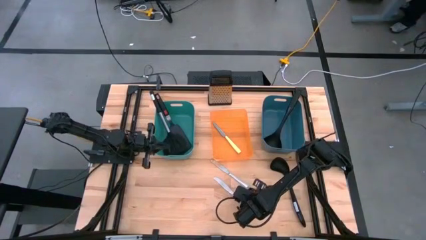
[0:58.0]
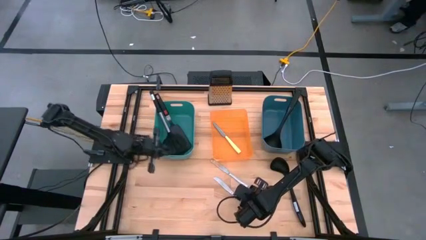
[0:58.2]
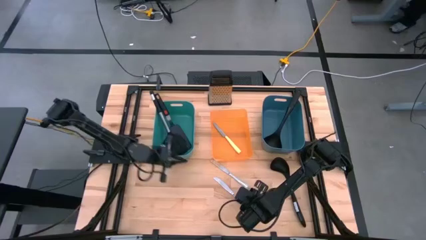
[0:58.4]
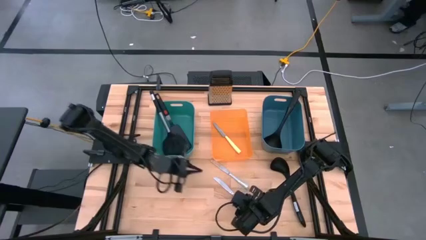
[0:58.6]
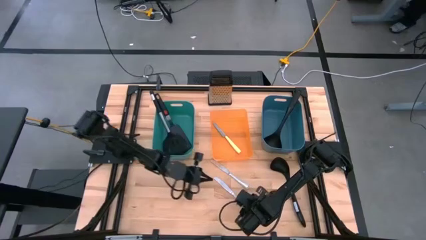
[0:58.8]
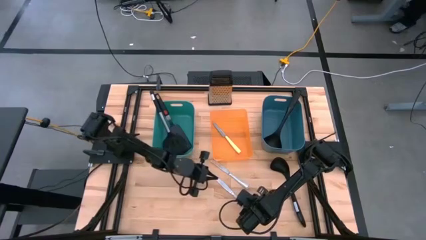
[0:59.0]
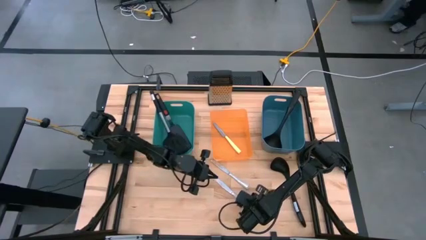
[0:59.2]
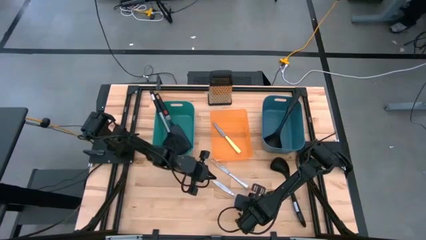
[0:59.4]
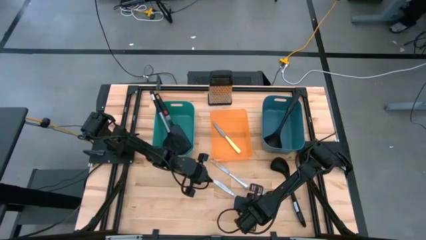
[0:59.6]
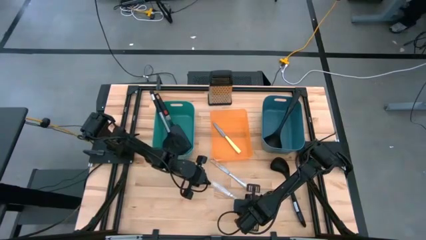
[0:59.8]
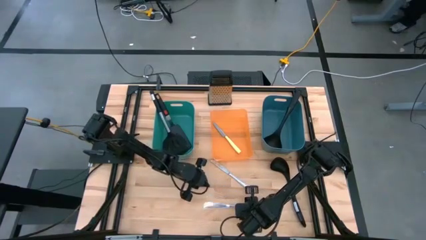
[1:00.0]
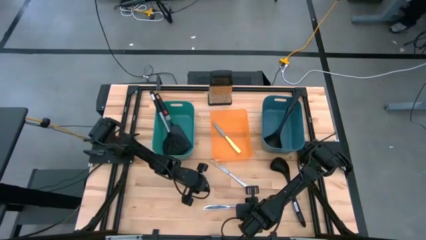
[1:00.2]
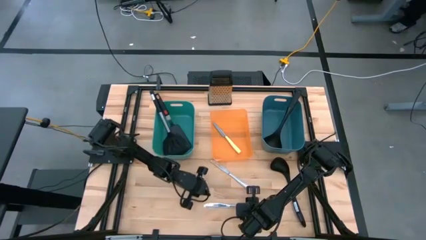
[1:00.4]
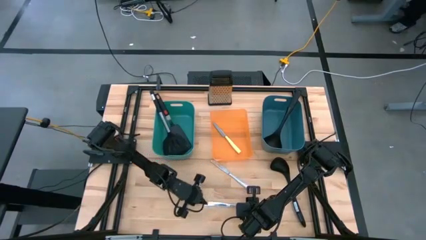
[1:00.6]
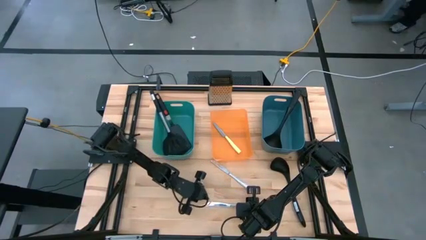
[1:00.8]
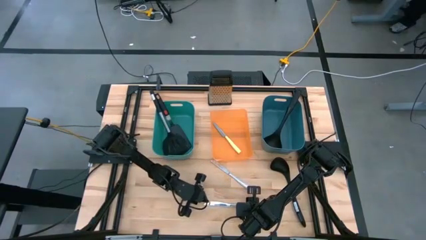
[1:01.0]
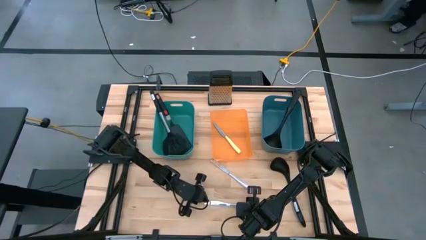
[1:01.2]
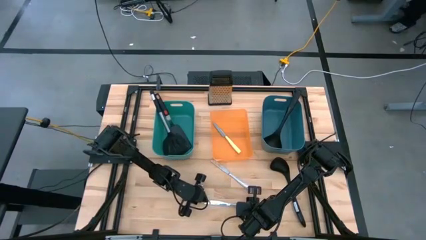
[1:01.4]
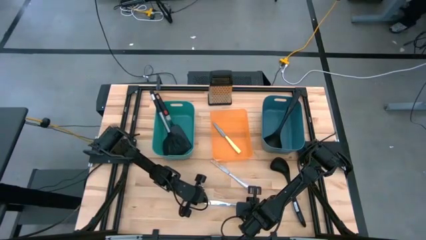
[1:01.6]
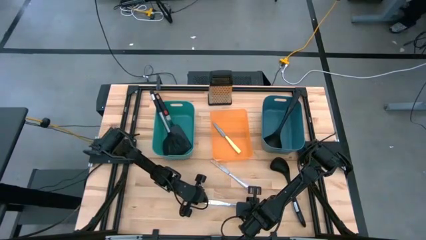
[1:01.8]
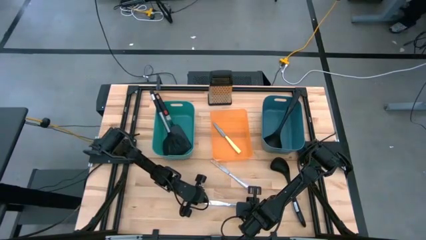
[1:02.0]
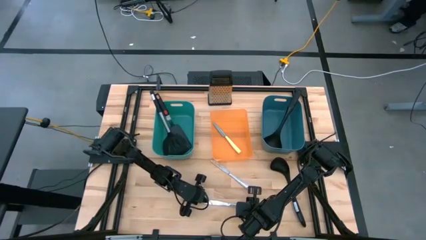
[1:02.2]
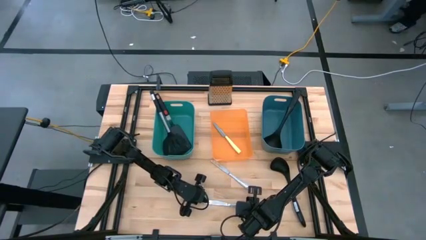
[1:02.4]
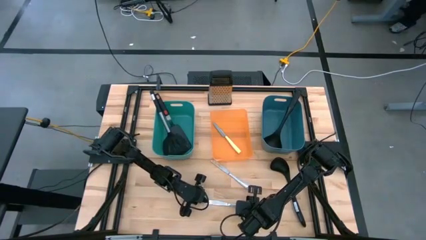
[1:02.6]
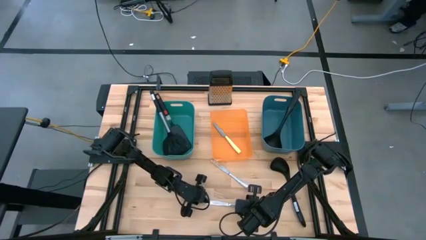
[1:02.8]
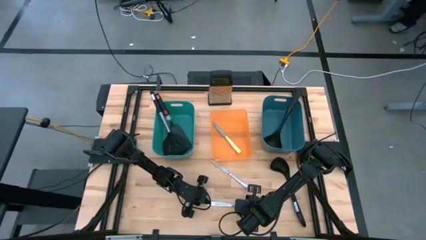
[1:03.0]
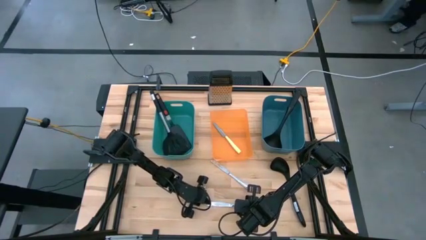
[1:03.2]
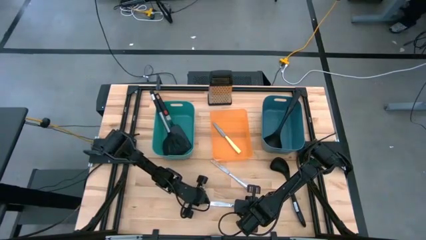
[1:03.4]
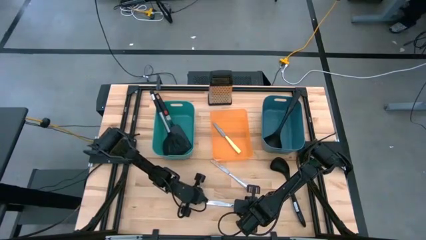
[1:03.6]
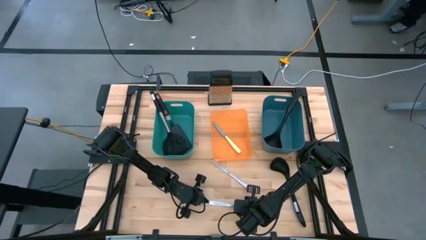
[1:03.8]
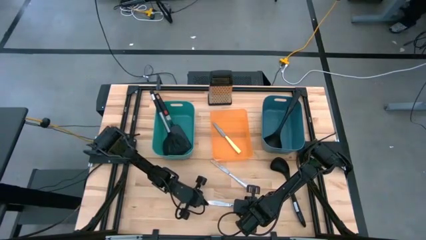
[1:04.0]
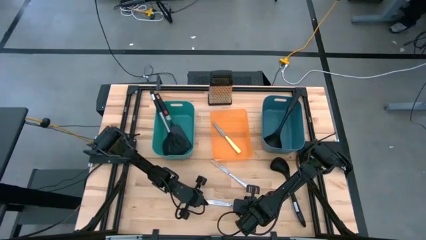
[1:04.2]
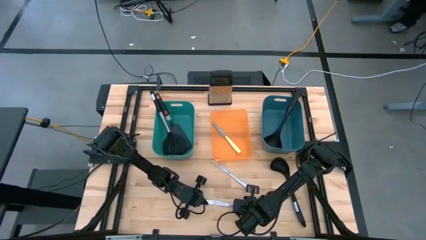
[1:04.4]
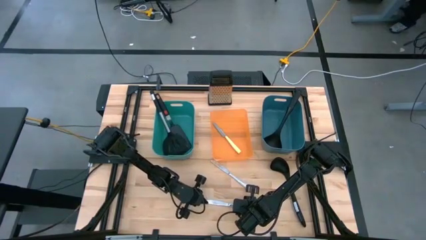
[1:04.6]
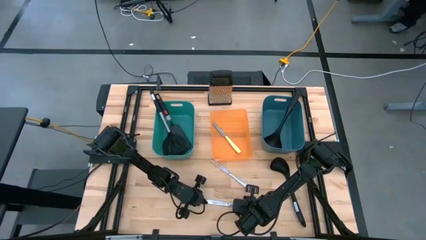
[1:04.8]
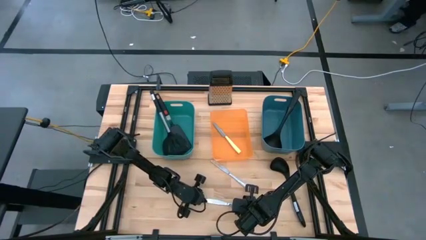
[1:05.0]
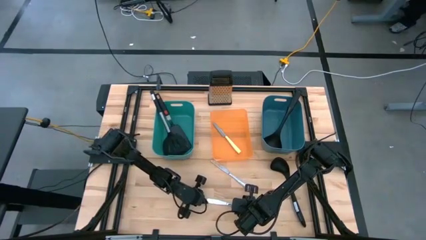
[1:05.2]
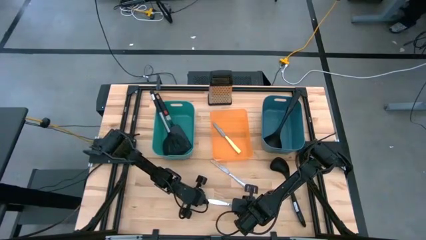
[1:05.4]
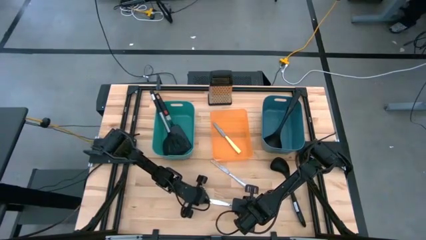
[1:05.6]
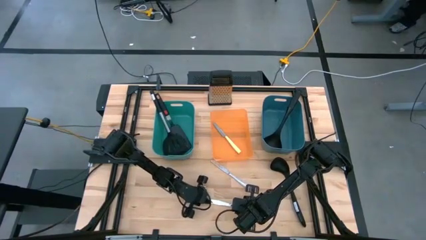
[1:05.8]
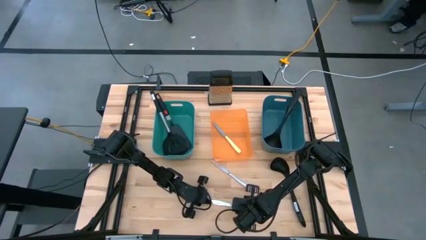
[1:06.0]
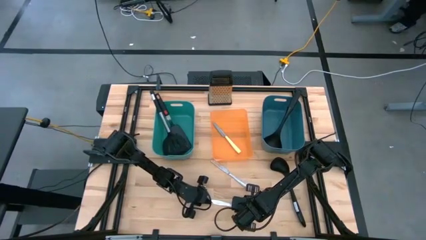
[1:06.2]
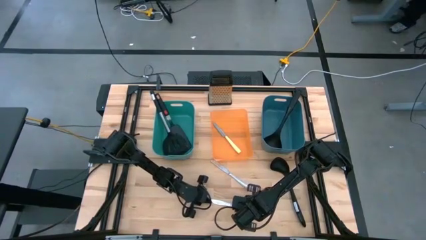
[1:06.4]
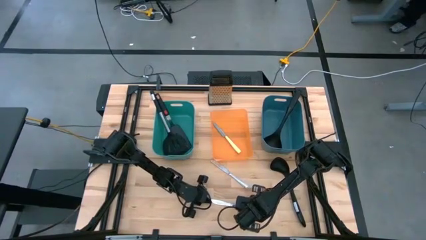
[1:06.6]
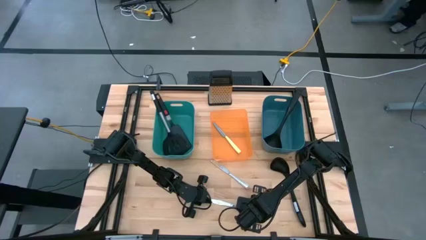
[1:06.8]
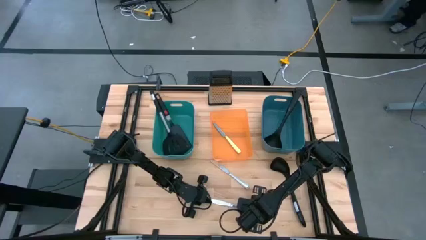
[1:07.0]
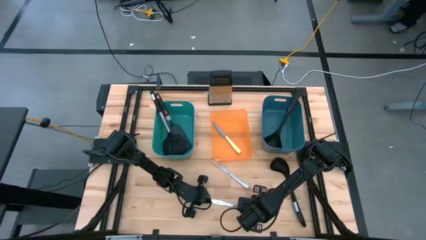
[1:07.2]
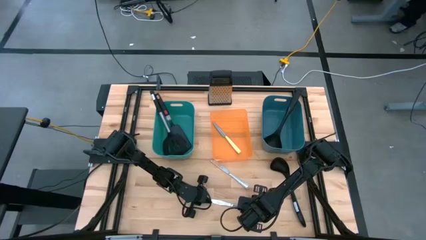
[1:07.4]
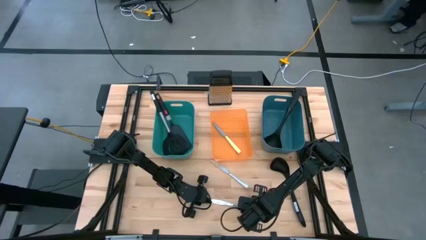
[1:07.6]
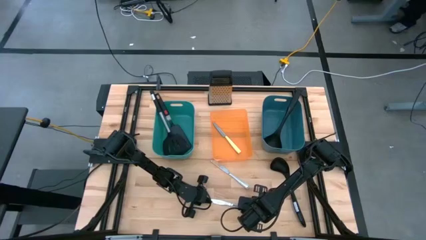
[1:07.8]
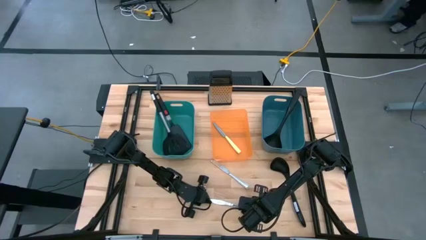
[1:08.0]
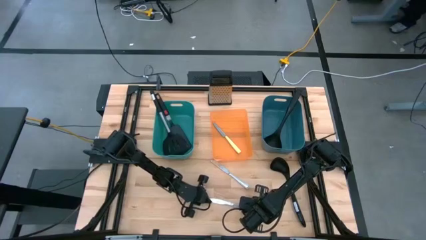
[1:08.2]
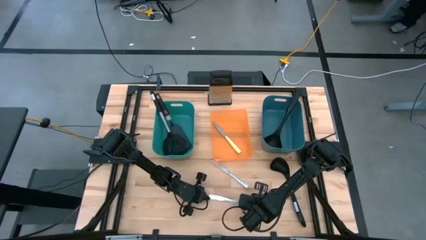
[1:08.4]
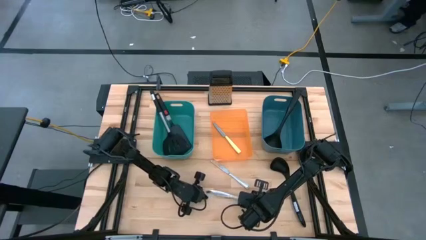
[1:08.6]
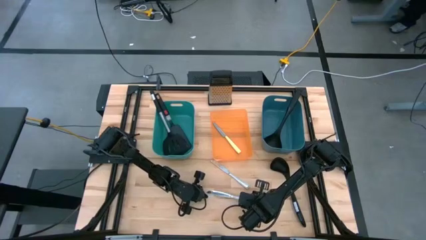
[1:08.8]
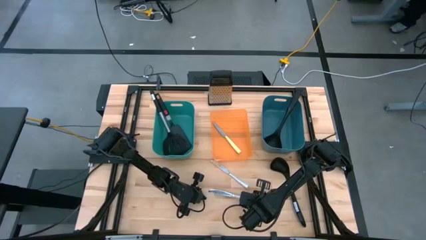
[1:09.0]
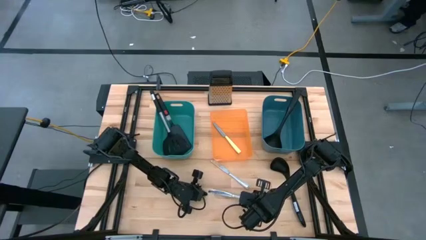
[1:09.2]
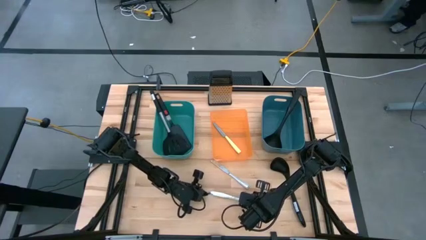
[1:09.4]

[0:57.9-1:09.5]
Task: Pick & Place Kitchen Items
Put the bottom silver knife into the orange bin

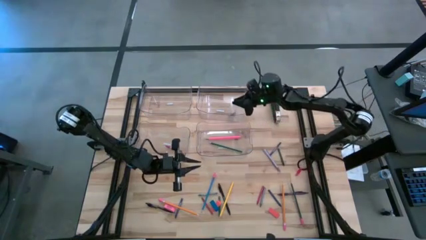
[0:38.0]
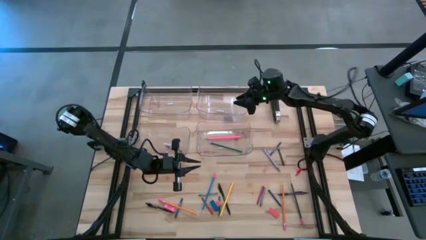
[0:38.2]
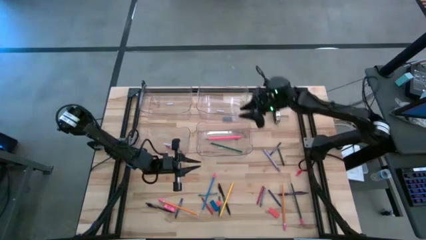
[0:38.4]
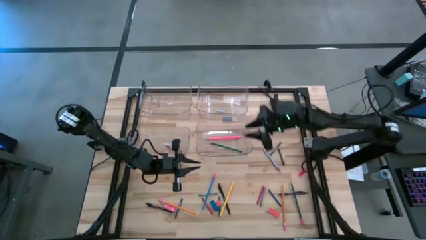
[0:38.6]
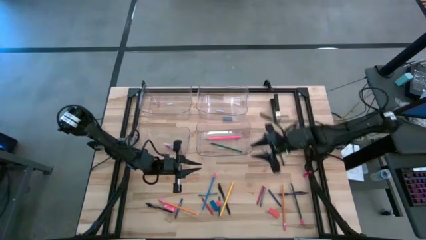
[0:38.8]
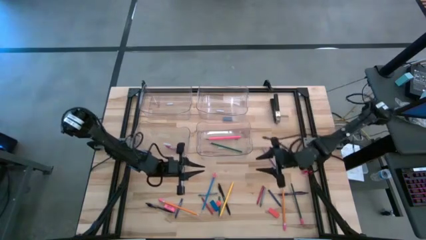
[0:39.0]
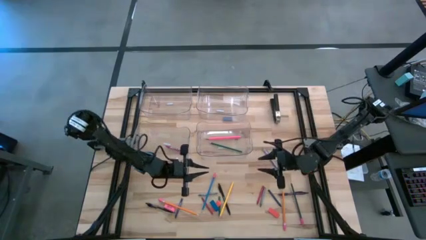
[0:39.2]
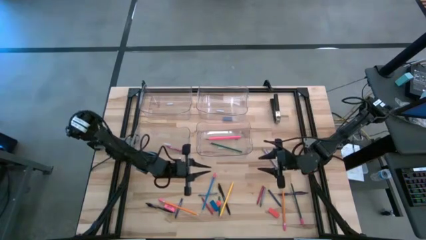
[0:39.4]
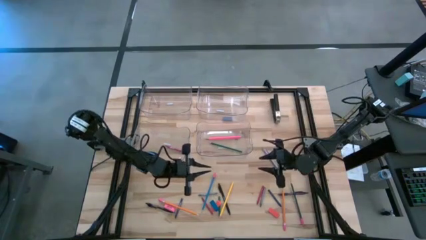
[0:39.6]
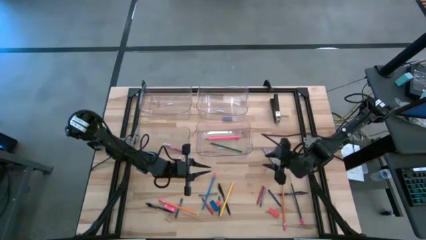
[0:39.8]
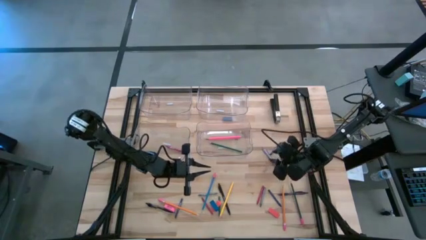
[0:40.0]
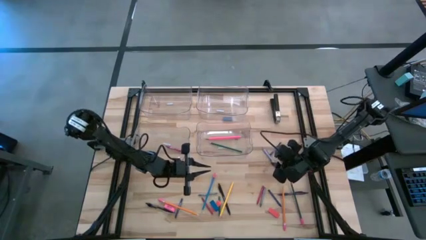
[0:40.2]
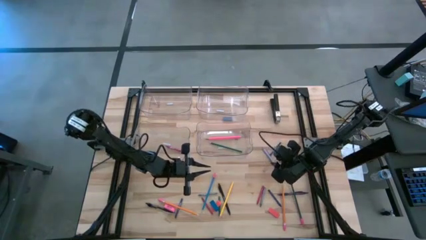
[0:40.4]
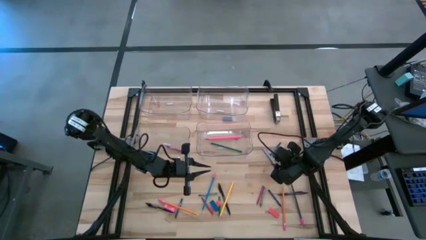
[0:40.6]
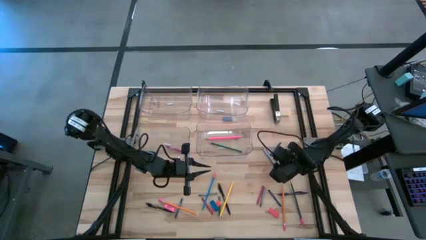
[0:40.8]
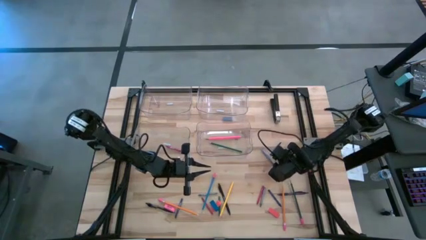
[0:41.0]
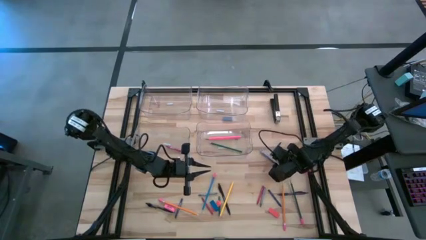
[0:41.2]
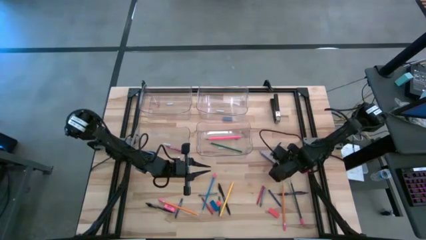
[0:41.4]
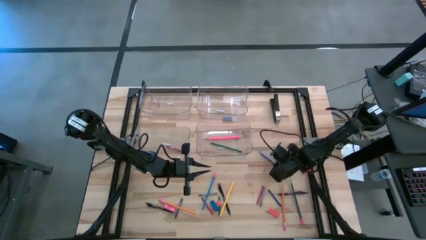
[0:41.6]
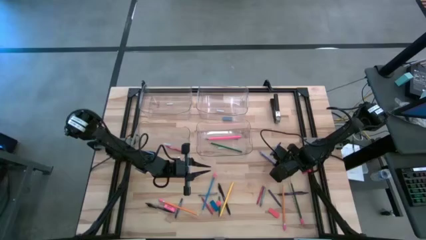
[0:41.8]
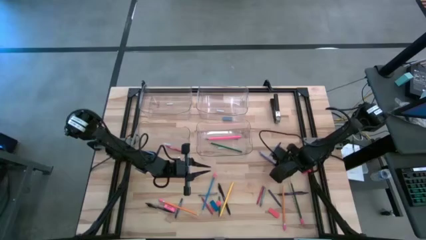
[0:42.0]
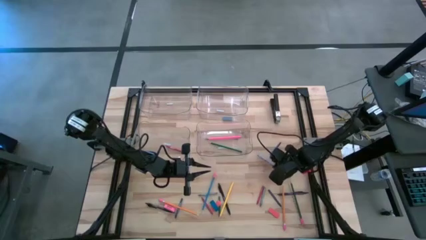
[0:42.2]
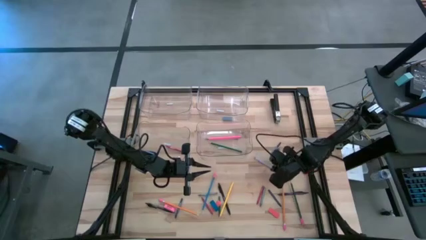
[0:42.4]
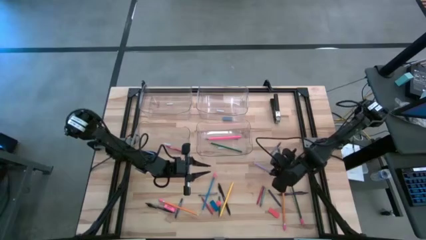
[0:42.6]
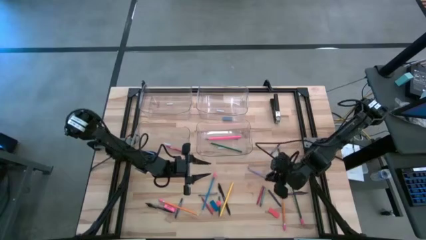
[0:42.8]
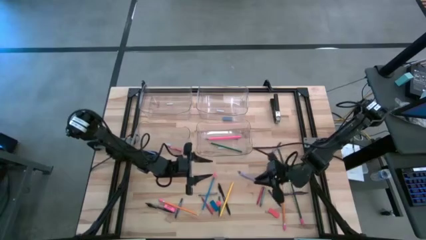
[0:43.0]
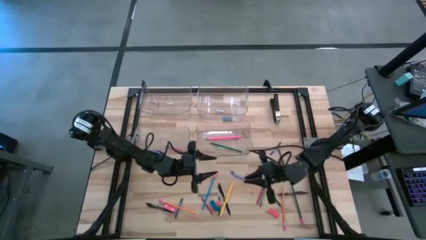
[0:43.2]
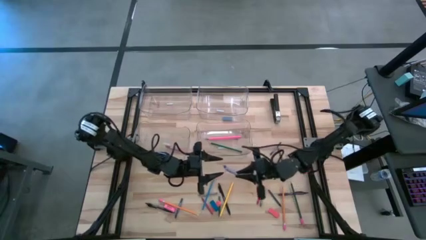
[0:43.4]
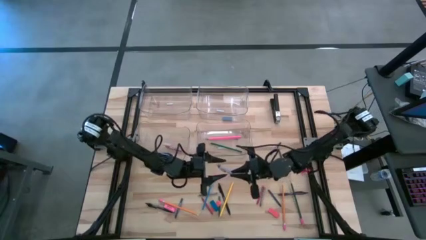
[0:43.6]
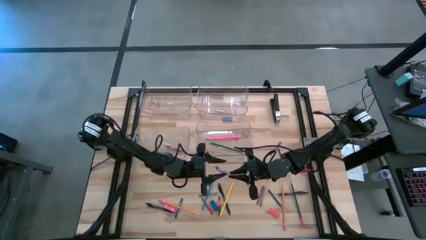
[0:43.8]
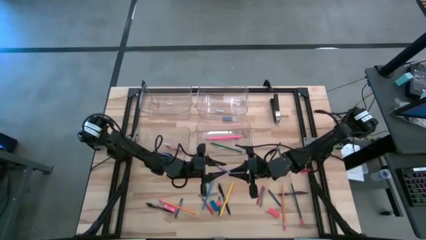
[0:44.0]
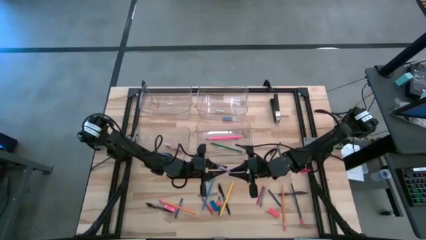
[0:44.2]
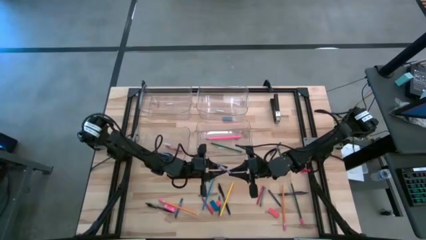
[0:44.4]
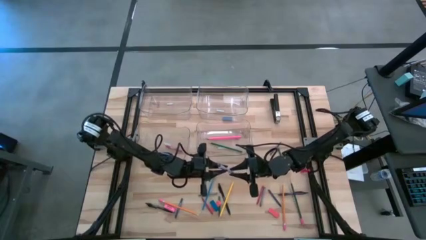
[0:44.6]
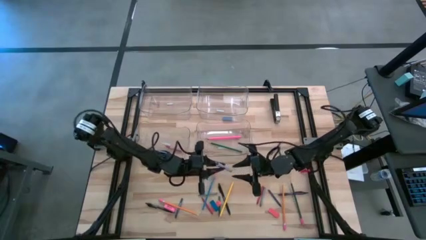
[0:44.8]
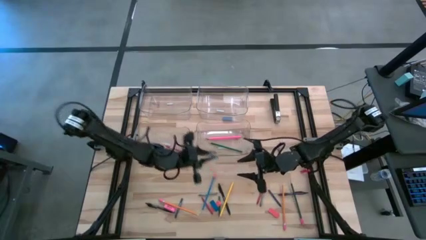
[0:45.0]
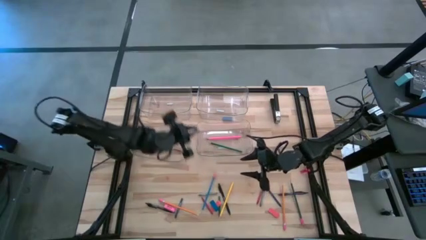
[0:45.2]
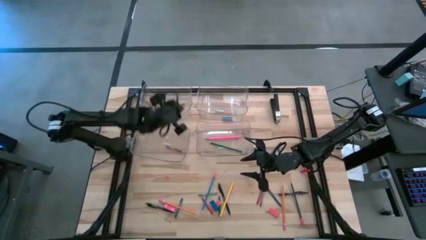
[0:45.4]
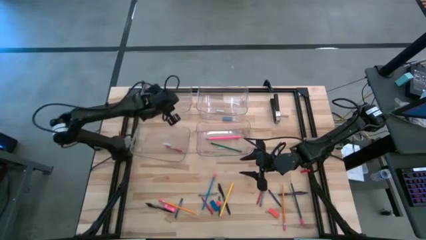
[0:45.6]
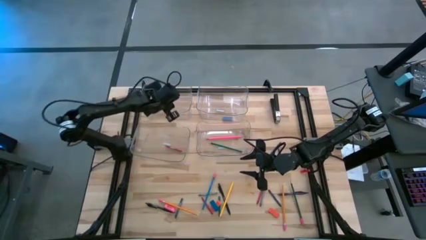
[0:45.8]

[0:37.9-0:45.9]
Task: Sort crayons/erasers/pens/pencils in bins
Put the blue ball pen into the top left transparent bin
